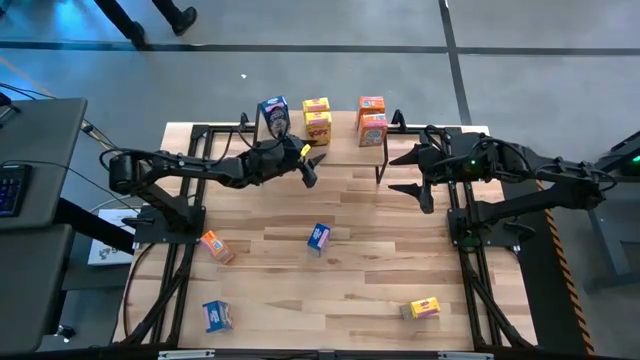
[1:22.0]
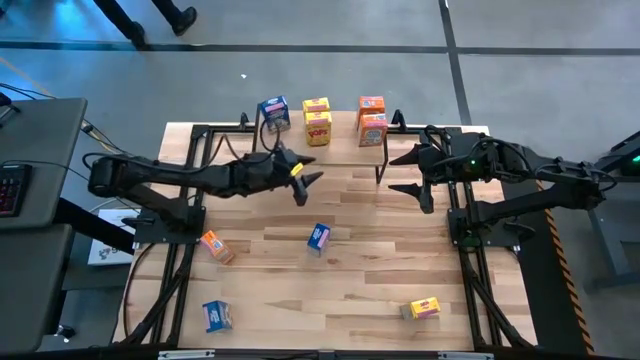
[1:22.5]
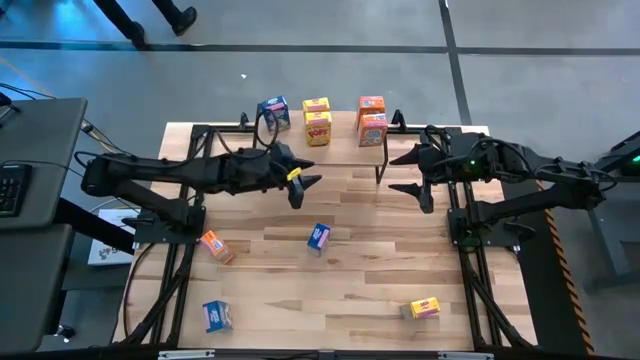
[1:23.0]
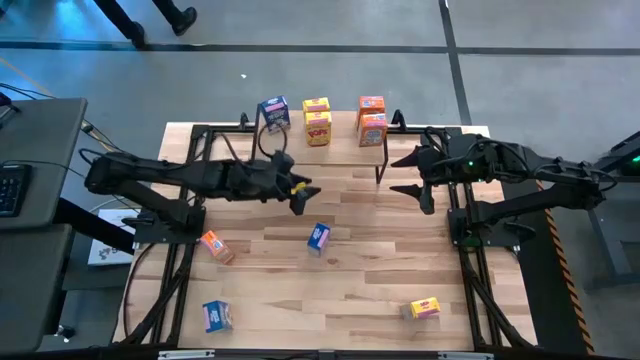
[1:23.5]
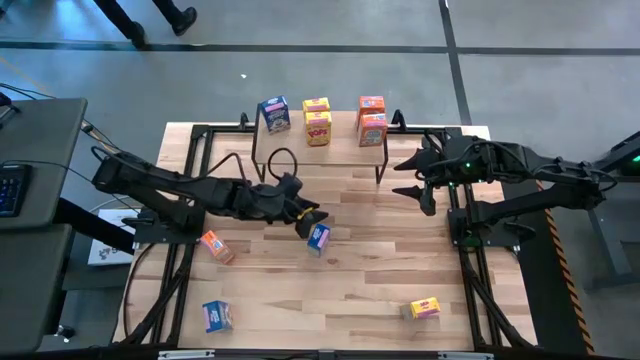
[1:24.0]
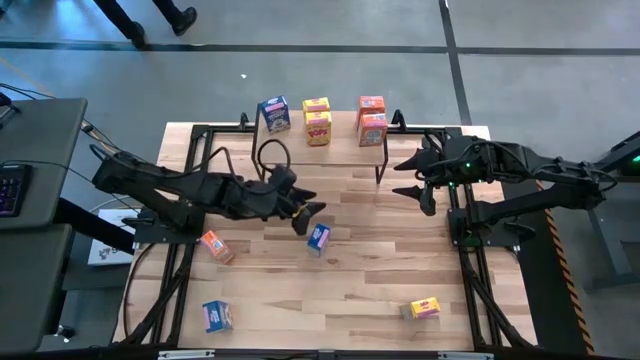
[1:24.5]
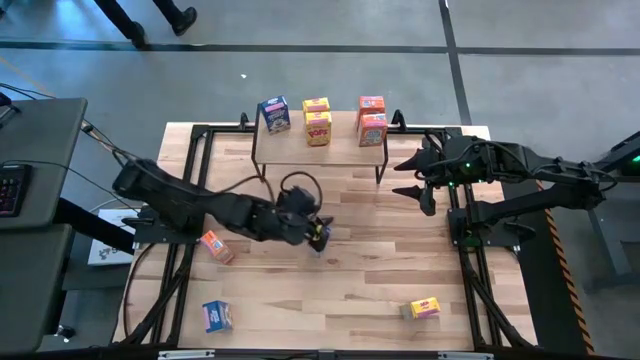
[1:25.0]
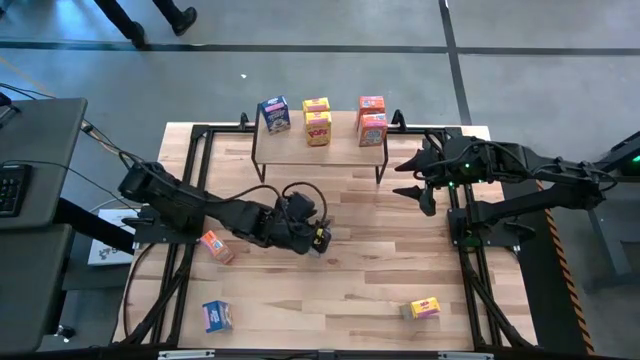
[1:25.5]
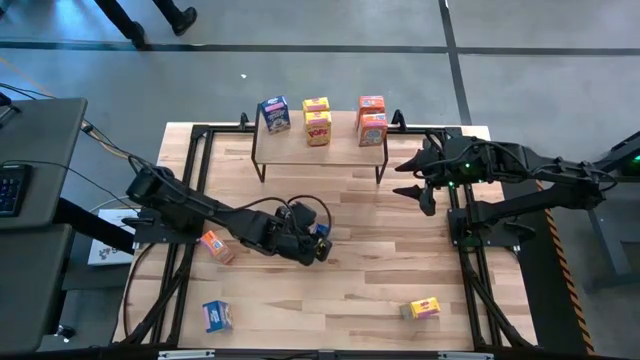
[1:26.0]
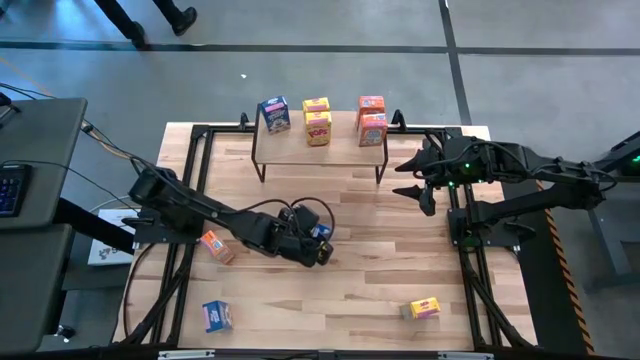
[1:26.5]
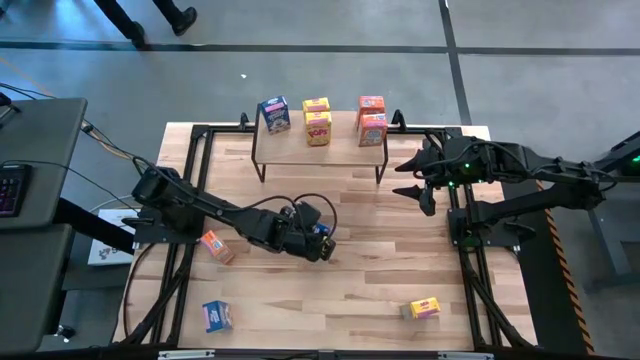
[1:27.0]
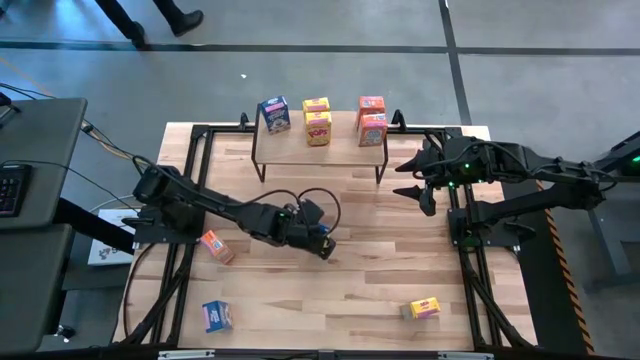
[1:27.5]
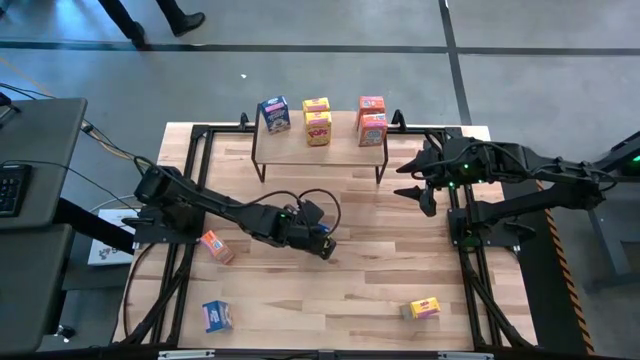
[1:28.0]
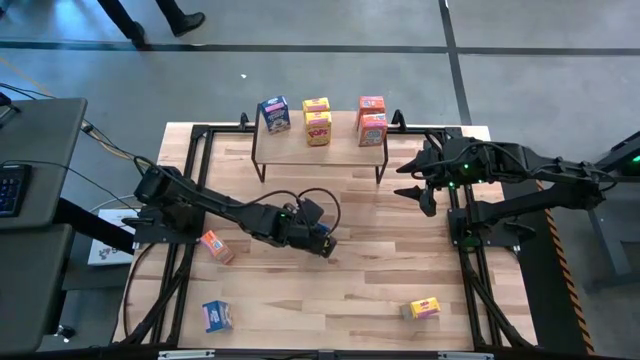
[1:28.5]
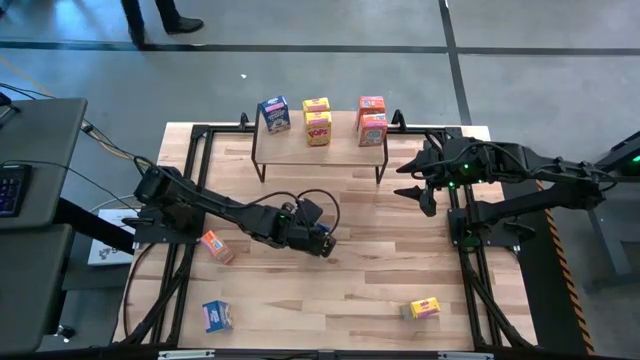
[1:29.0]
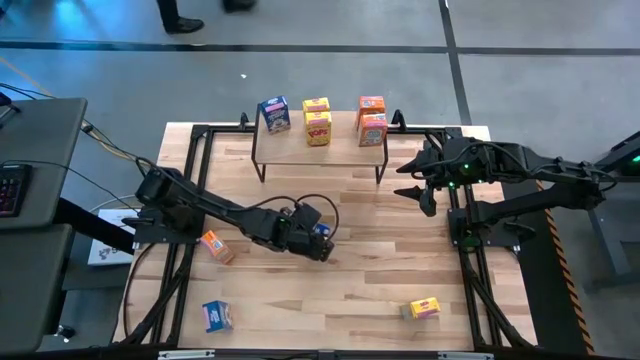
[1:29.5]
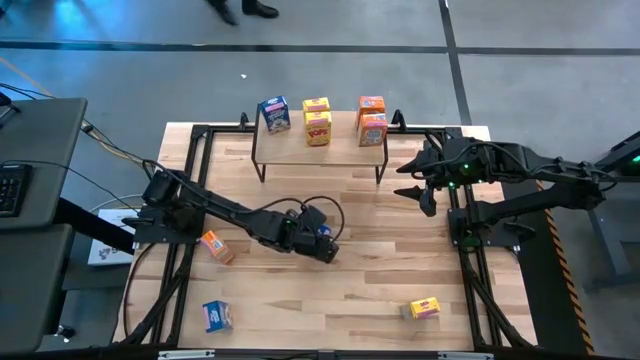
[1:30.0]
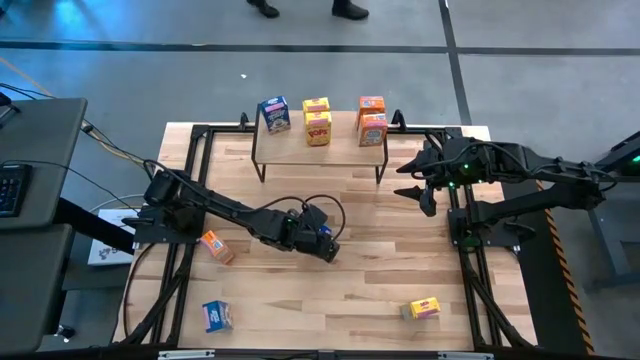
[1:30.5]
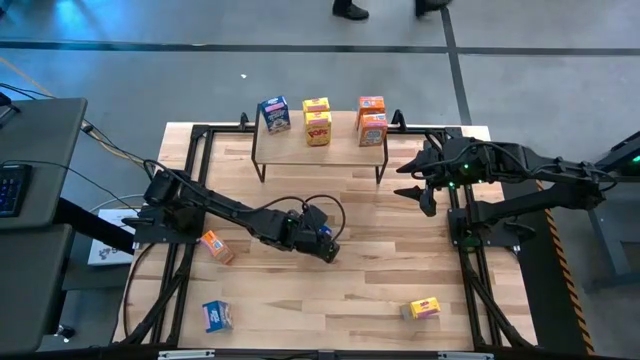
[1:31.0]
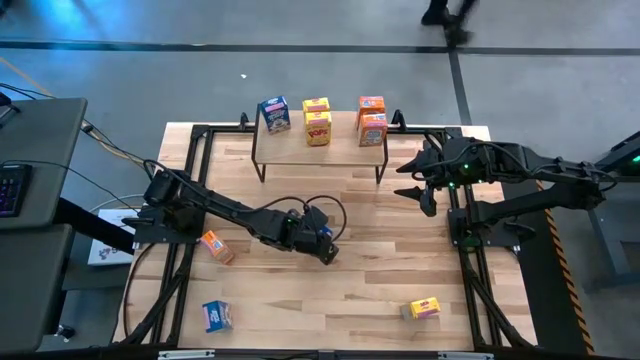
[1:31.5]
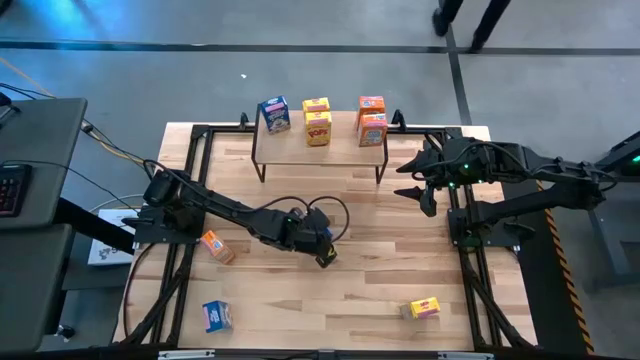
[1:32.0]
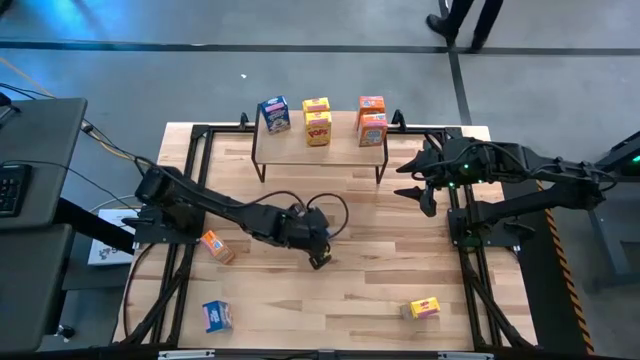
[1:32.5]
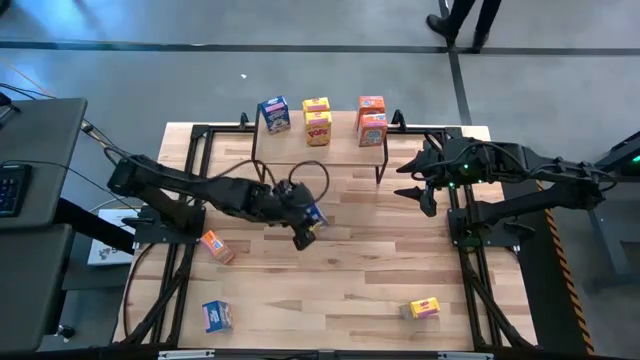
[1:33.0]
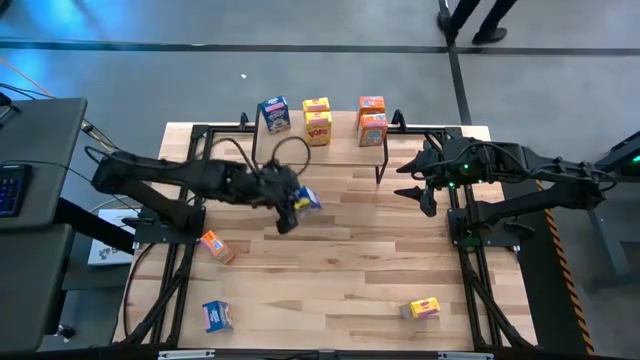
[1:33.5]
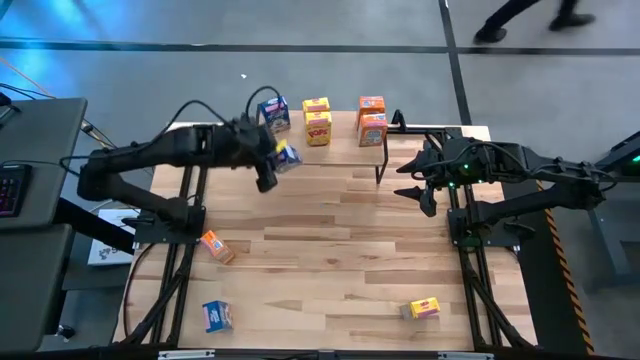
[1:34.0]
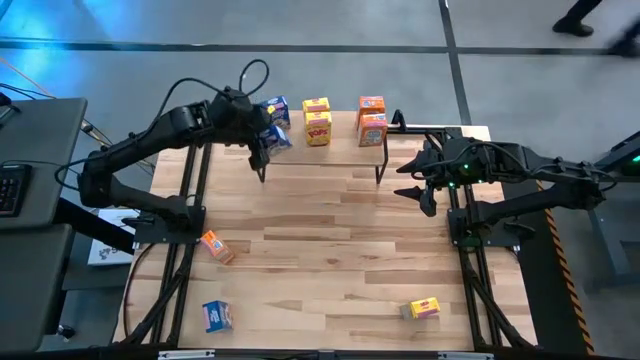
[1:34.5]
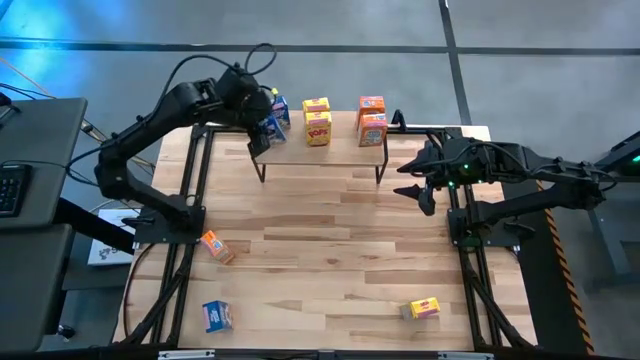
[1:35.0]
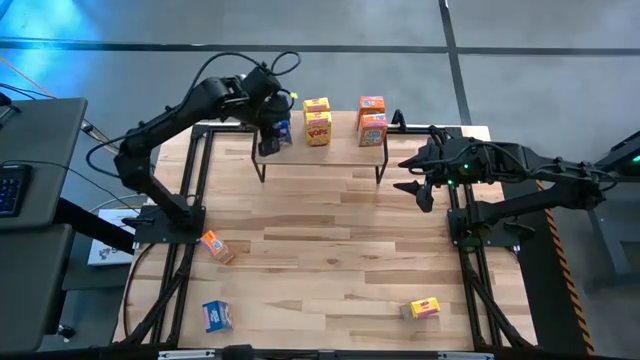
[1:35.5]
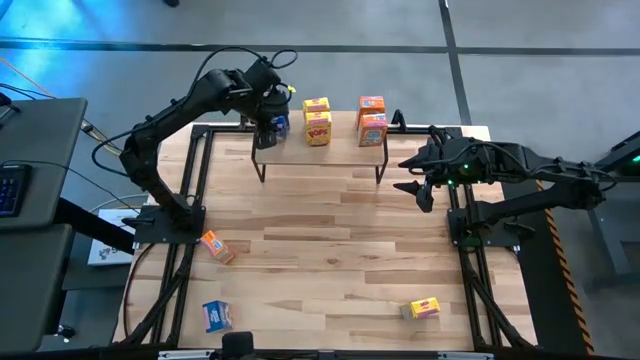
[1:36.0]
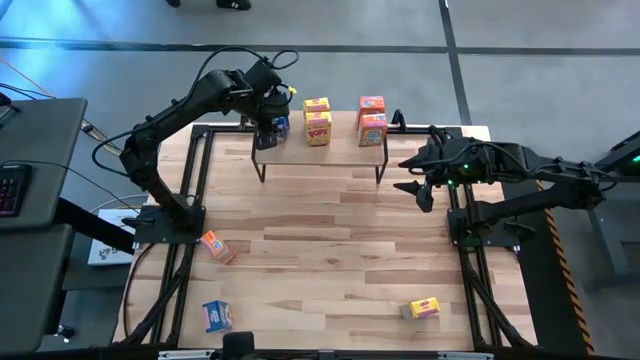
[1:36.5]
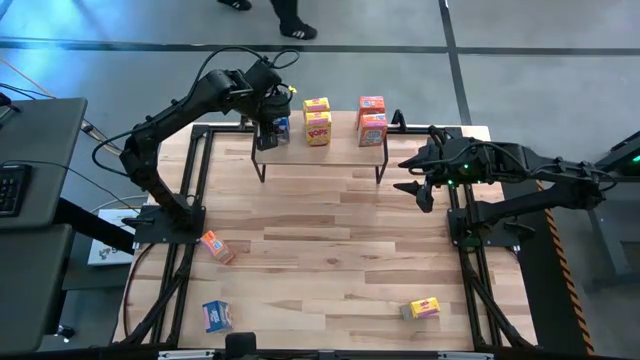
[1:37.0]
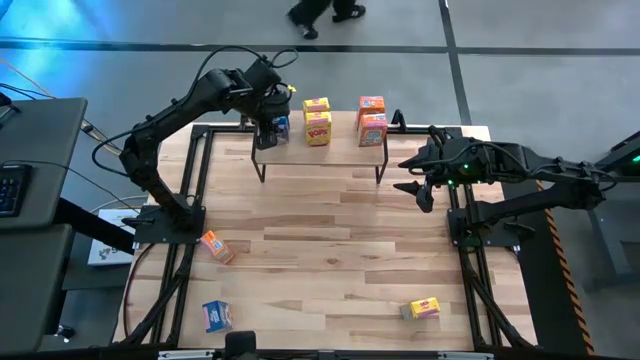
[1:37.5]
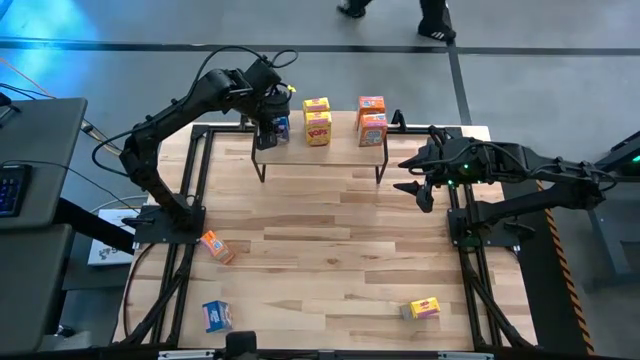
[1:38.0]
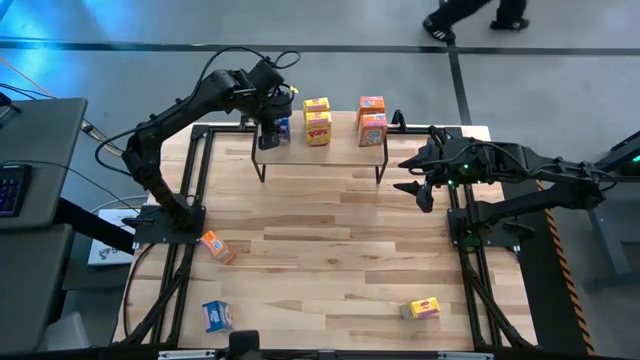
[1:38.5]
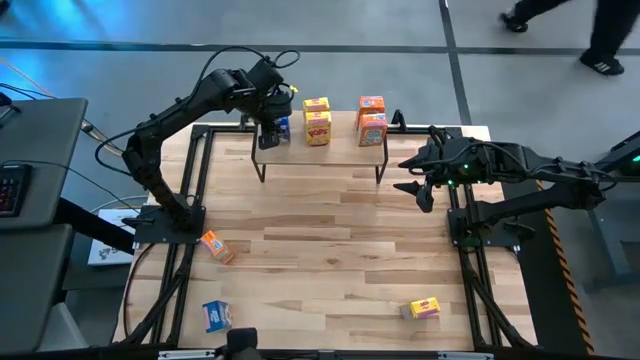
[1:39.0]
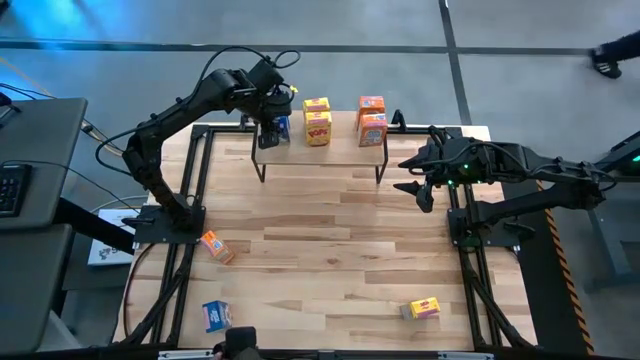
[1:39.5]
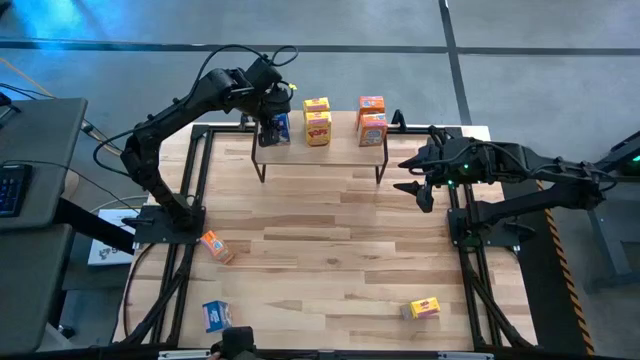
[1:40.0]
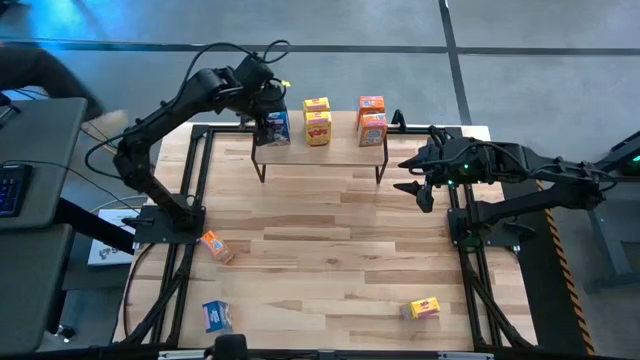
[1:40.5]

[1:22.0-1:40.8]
Task: Stack cereal on shelf
Put the right blue cereal box and aligned with the other blue cereal box on the shelf

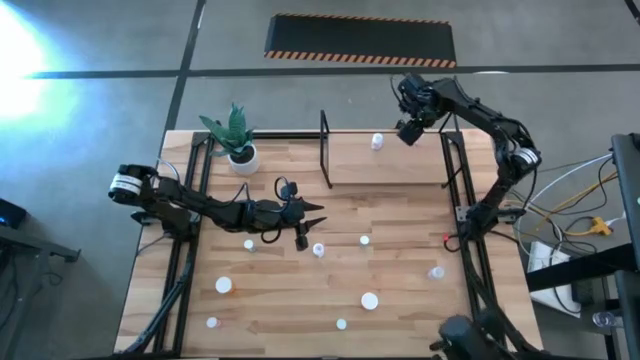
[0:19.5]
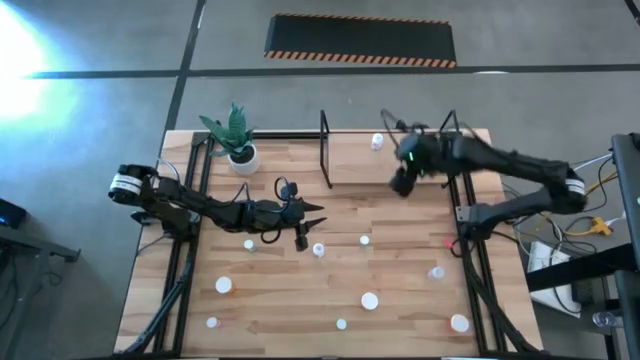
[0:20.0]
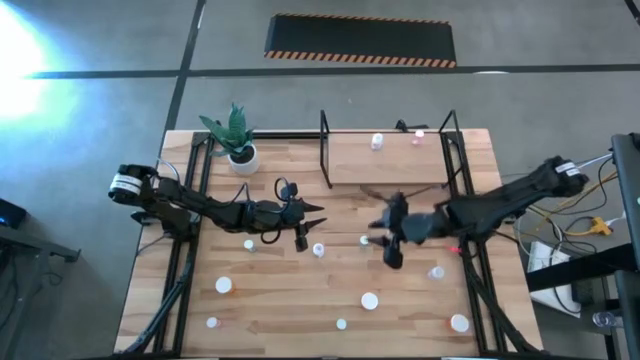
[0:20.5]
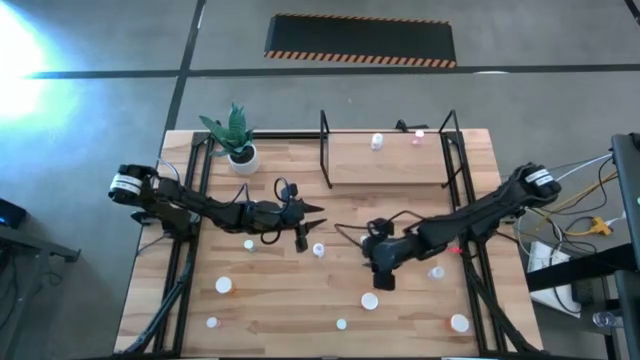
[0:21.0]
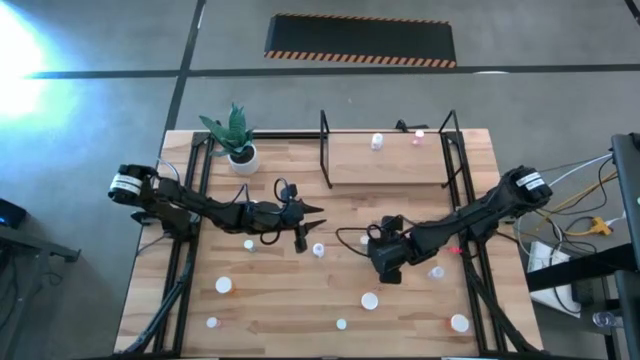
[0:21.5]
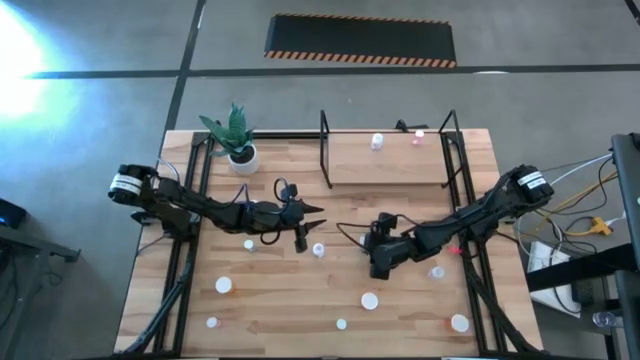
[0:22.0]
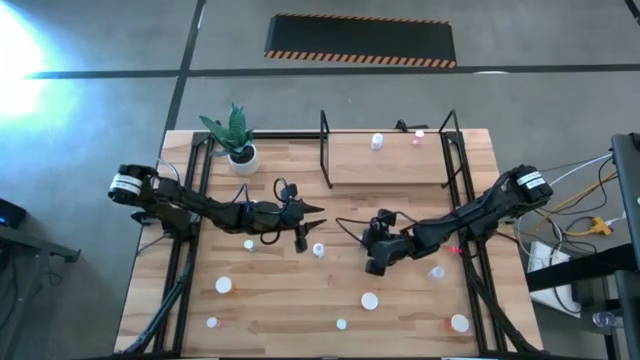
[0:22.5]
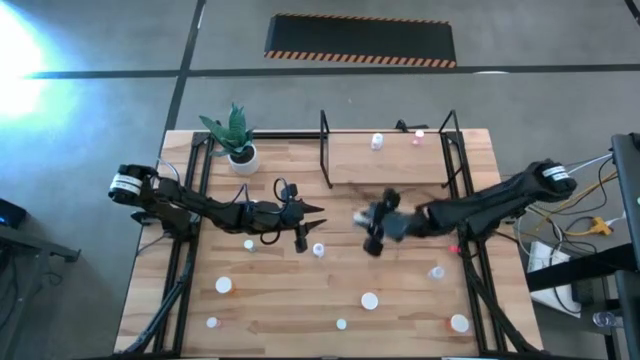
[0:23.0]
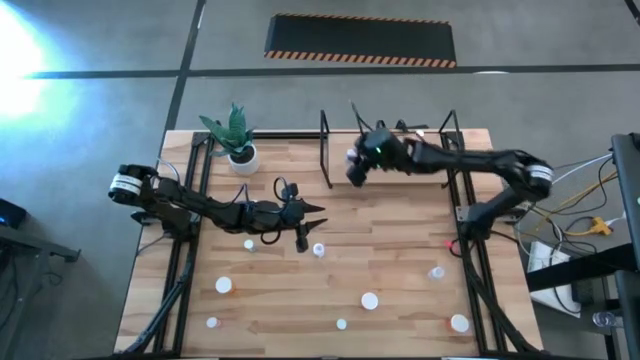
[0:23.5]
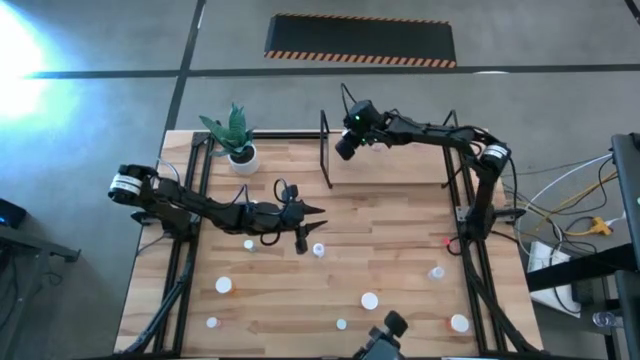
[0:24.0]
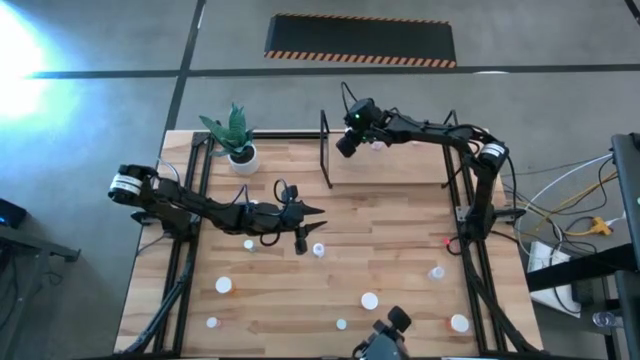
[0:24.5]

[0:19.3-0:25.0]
Task: Pick and place medicine bottles onto shelf by color
Put the top right blue pill bottle on the shelf
